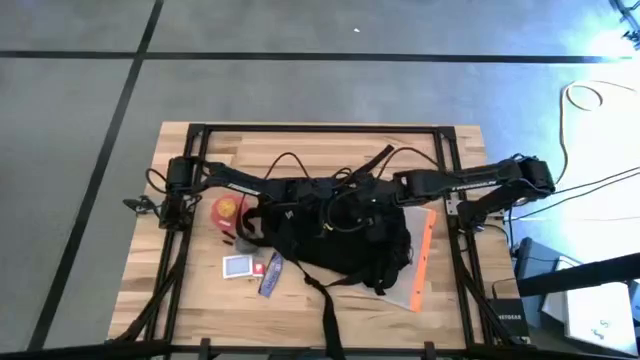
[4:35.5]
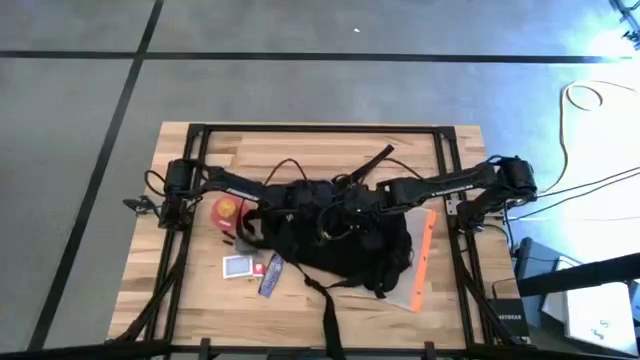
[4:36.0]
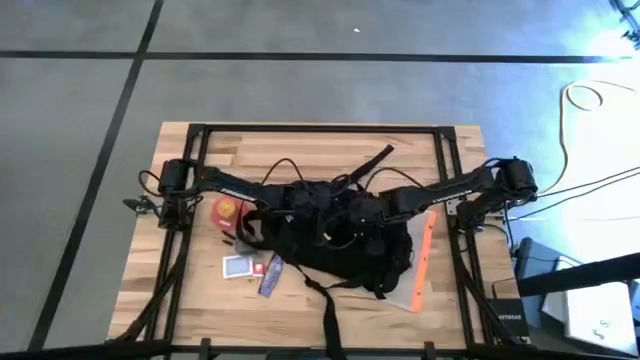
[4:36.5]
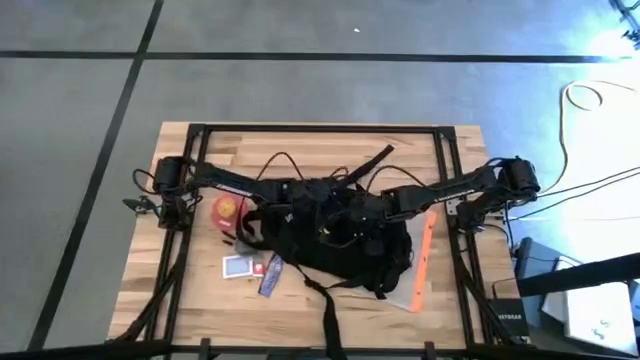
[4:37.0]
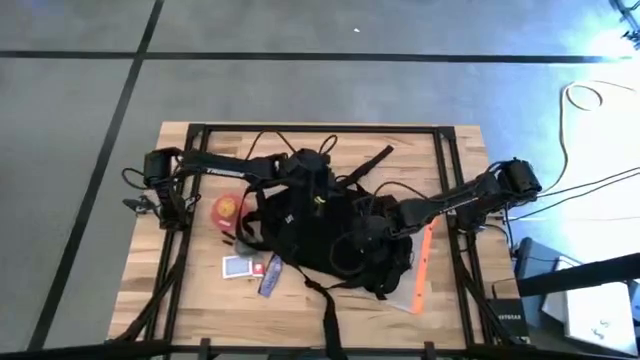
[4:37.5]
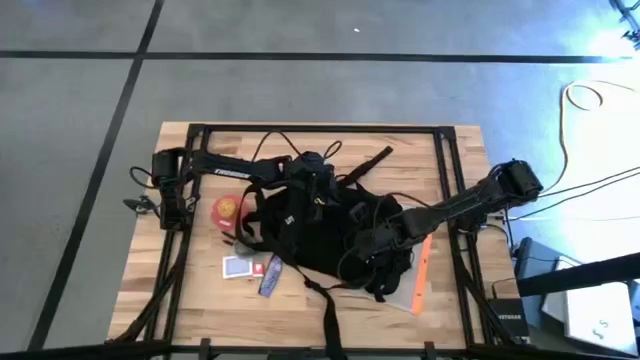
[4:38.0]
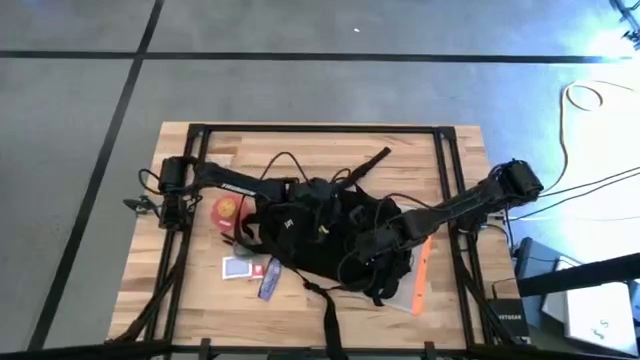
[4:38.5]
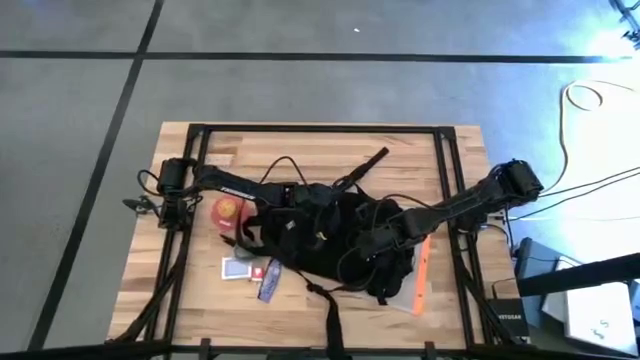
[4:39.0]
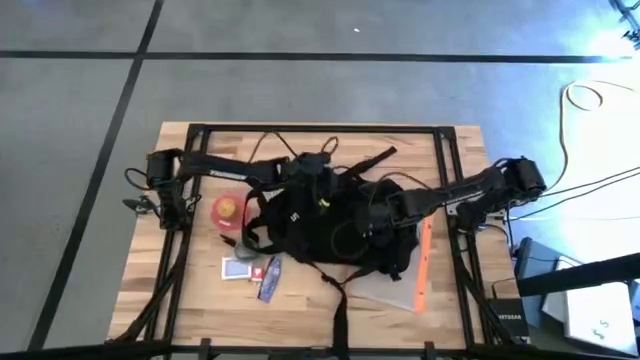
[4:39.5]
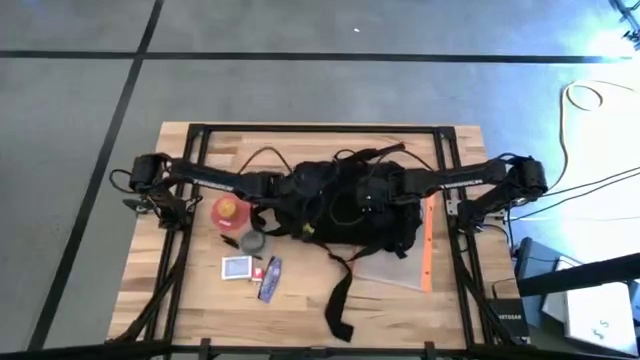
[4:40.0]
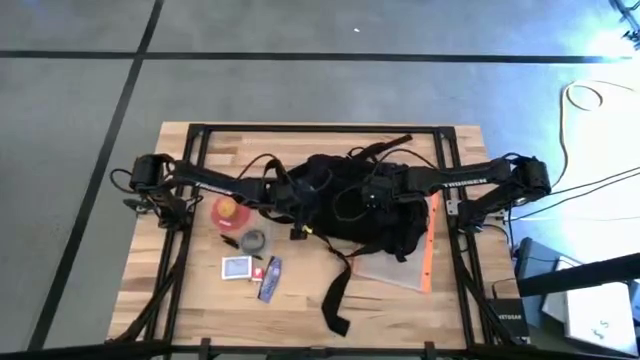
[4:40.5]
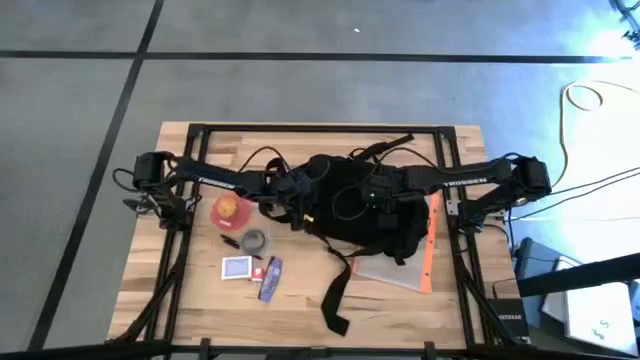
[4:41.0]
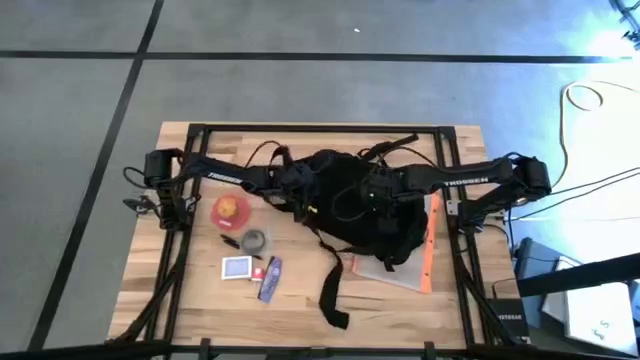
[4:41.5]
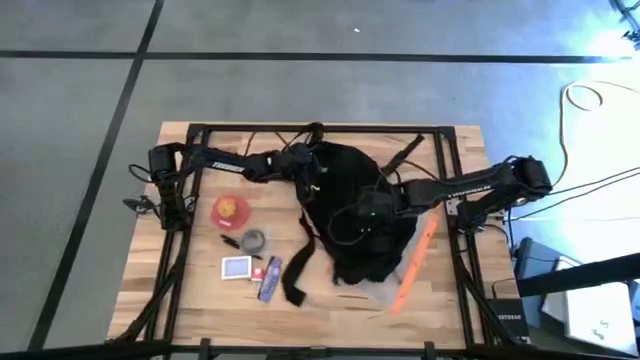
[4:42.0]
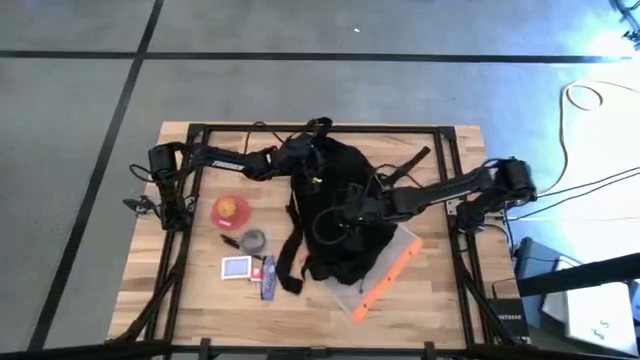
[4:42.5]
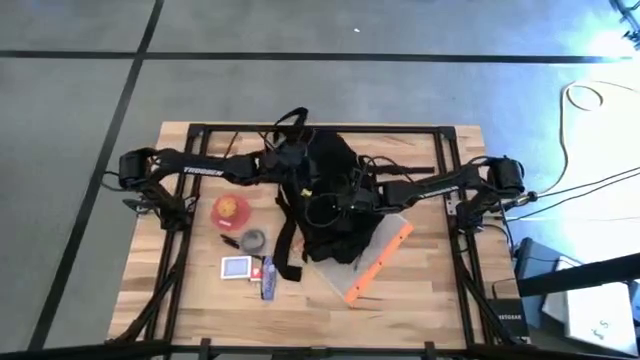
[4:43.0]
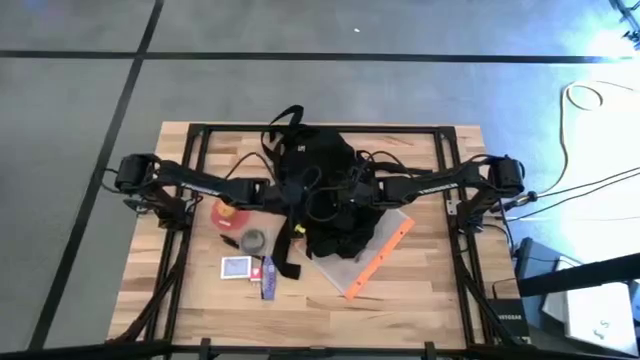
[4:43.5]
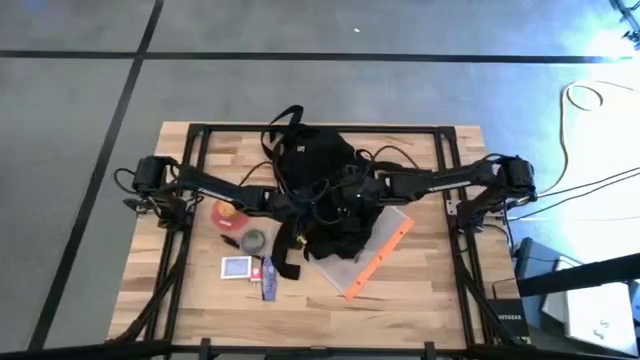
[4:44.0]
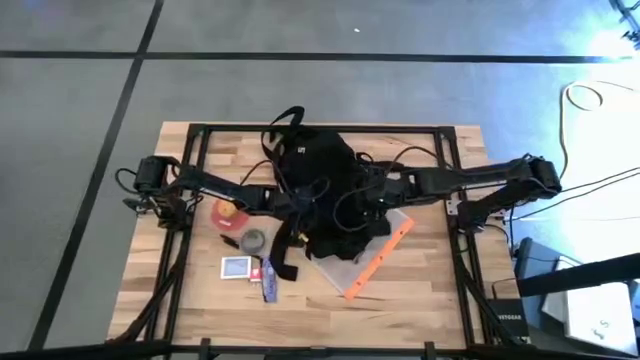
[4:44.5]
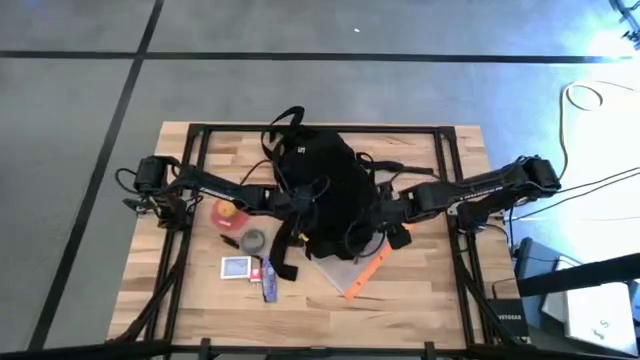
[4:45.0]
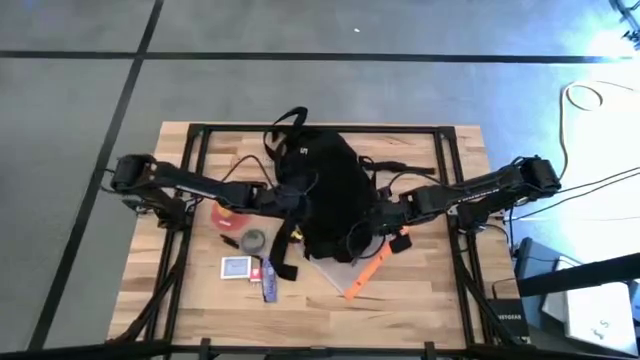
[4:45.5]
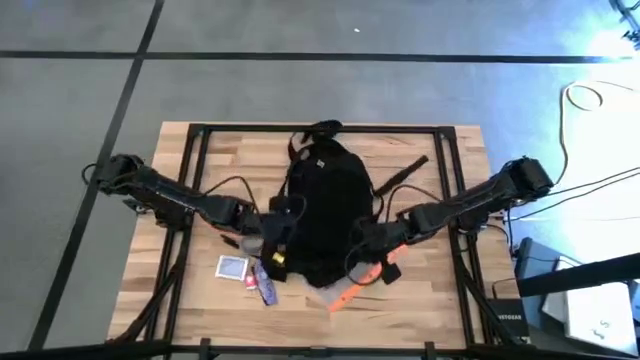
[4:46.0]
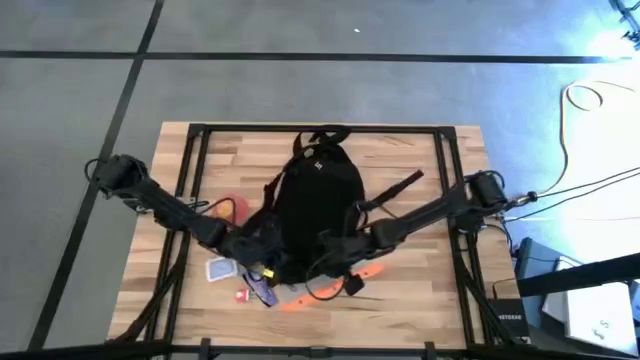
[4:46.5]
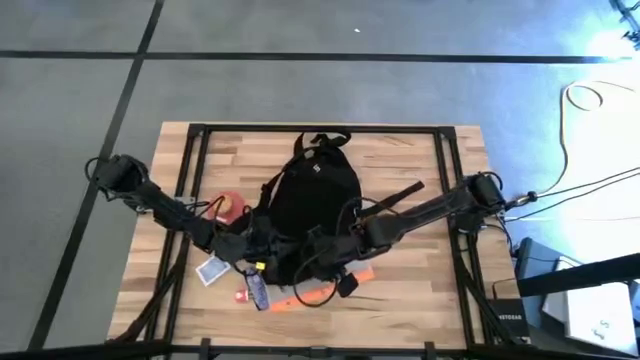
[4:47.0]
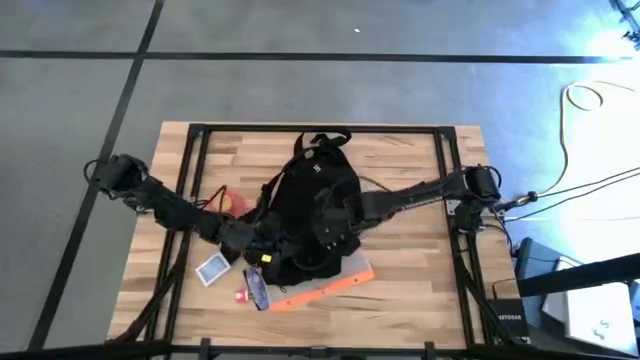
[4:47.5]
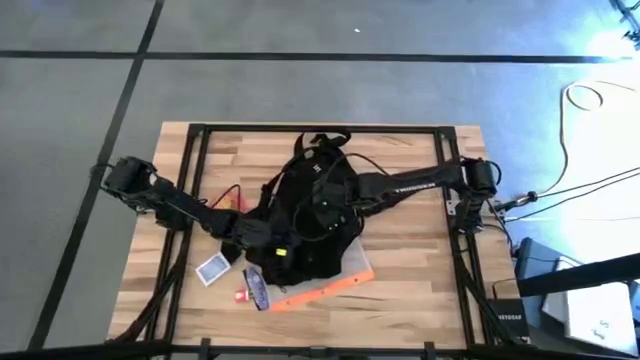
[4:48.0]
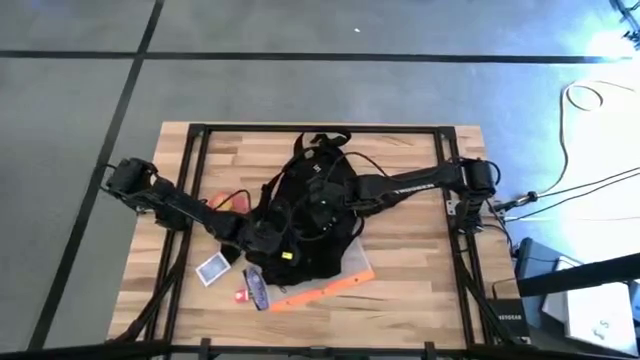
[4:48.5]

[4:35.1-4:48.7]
Task: Unpack backpack
Remove the pink charger cable from the black backpack

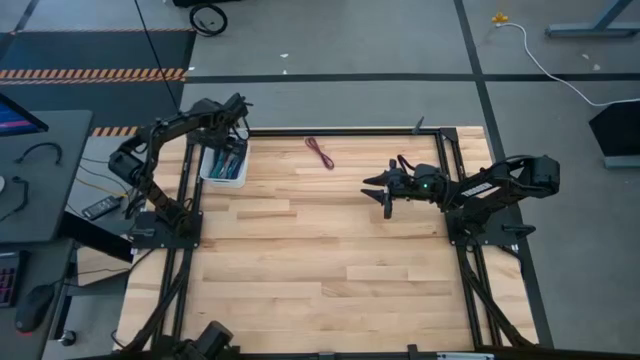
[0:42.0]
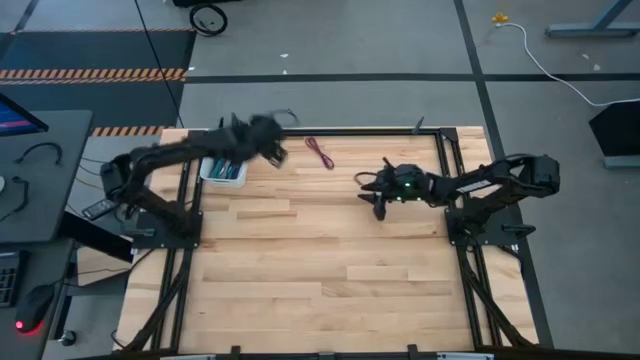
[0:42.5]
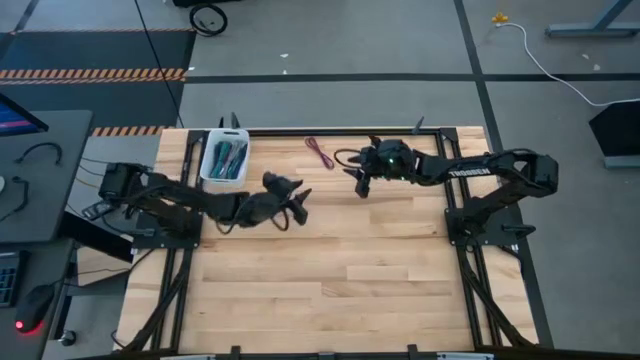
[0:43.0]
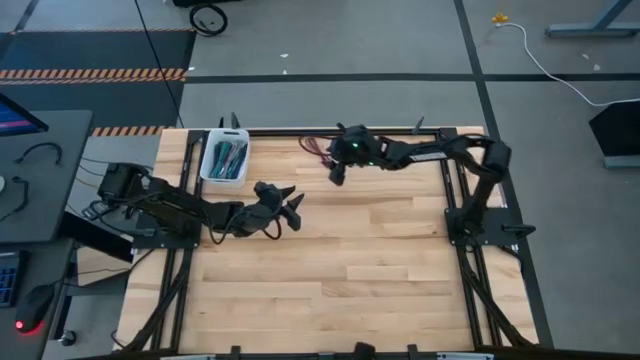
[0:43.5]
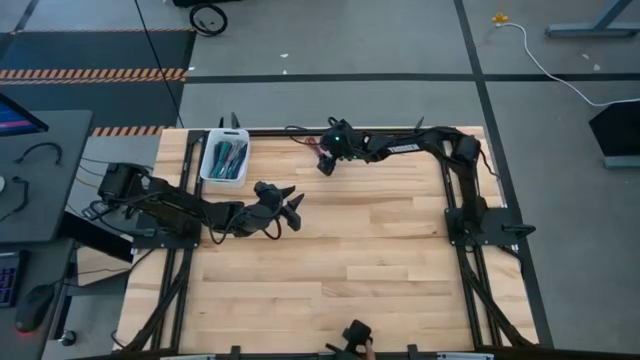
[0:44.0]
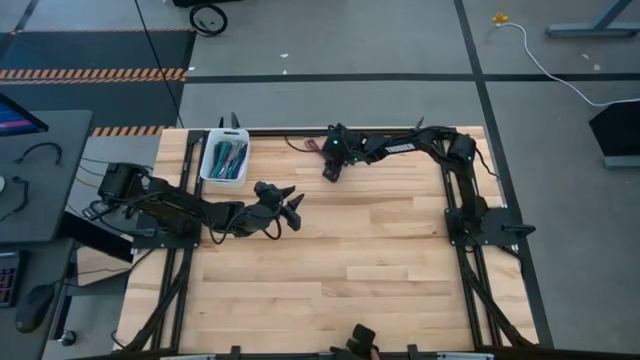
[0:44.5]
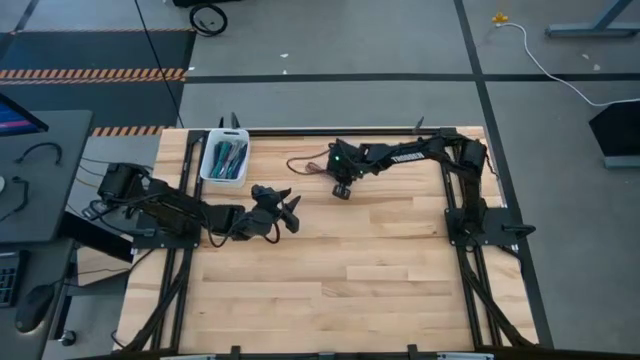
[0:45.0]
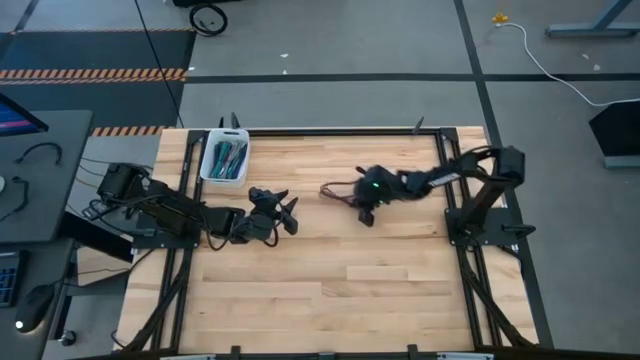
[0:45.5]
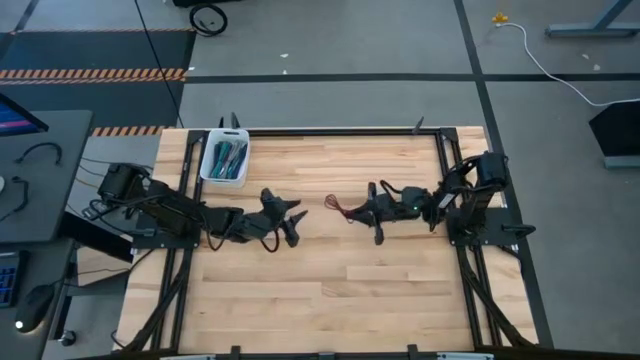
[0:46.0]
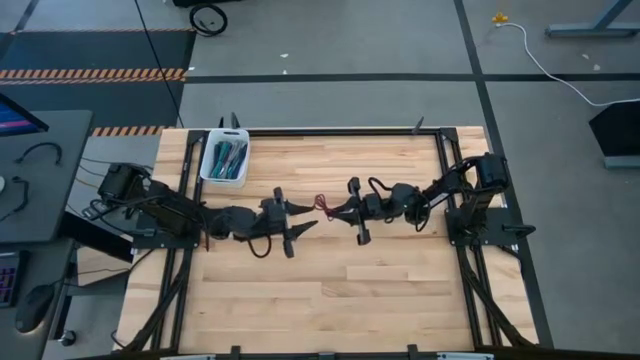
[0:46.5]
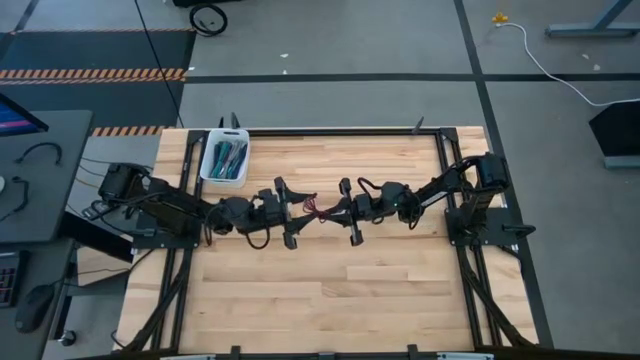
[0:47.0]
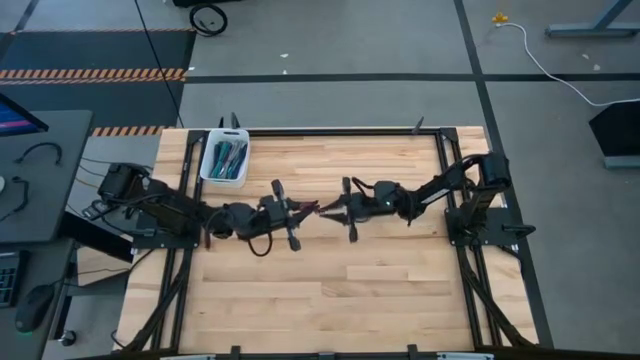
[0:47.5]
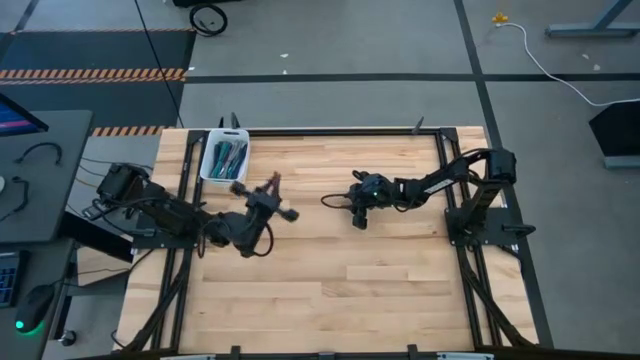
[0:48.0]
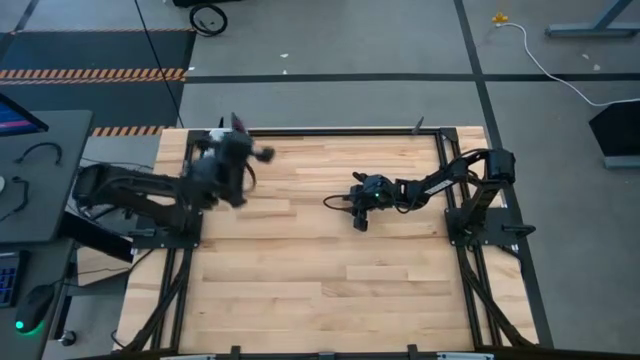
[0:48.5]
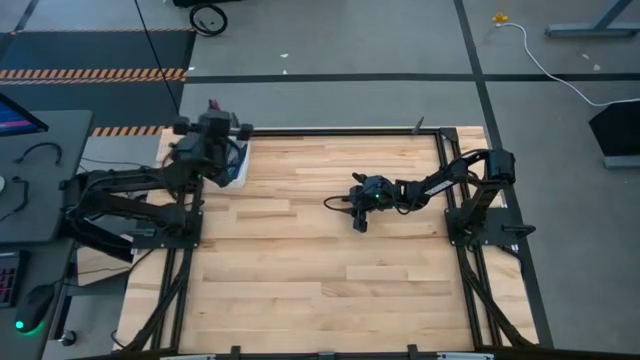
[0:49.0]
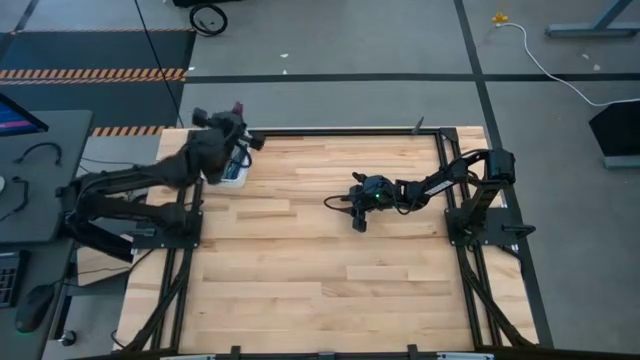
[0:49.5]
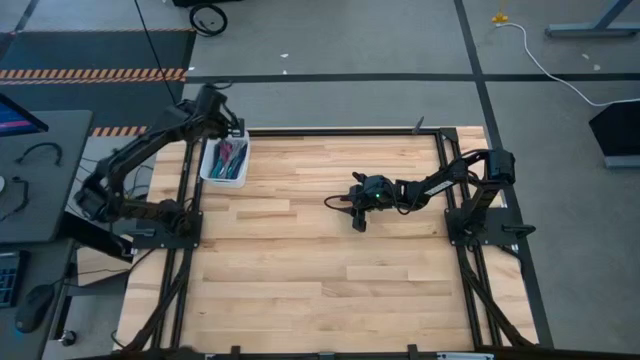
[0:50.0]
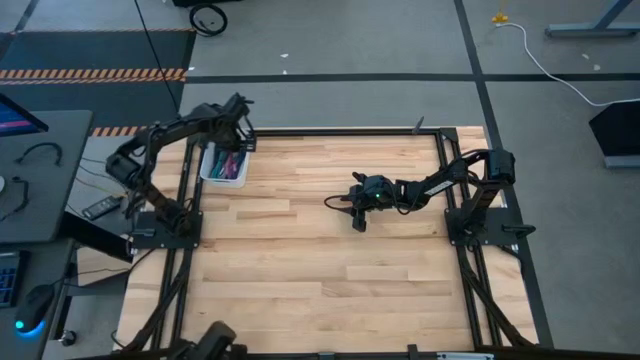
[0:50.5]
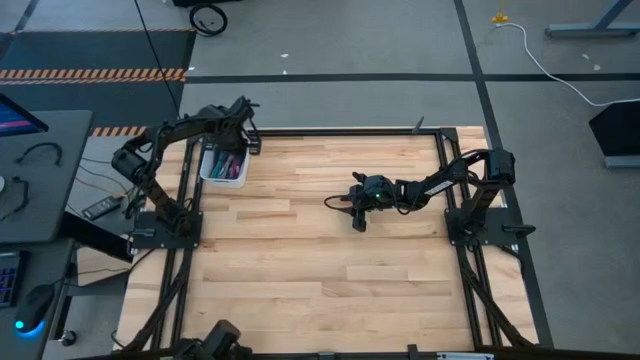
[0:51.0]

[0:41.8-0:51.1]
Task: Pick and place USB-C Cables
Put the pink charger cable into the white bin
